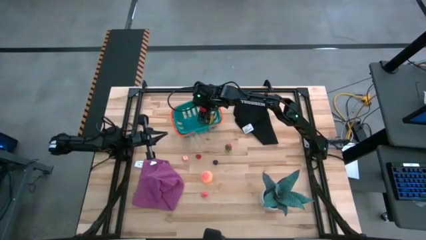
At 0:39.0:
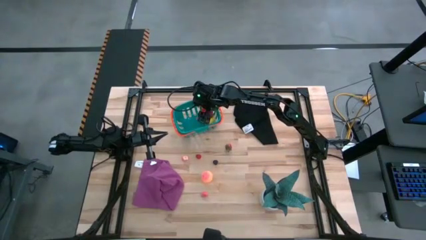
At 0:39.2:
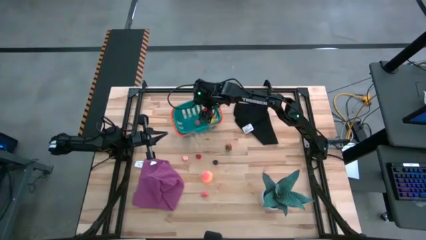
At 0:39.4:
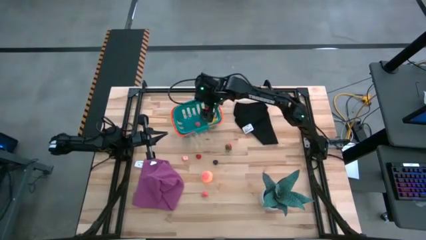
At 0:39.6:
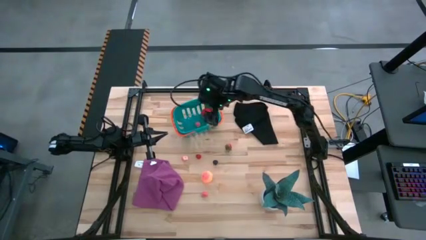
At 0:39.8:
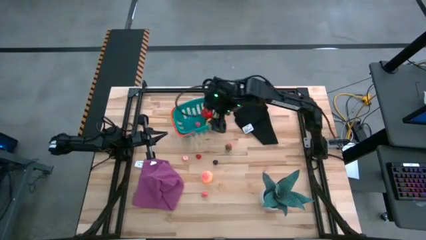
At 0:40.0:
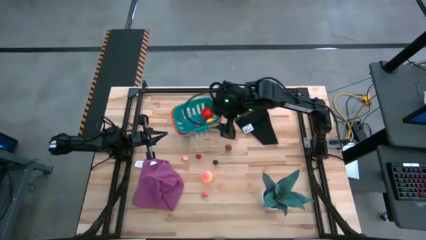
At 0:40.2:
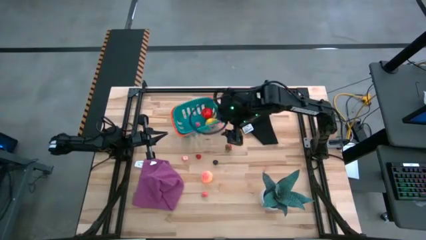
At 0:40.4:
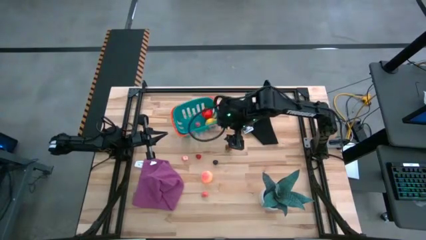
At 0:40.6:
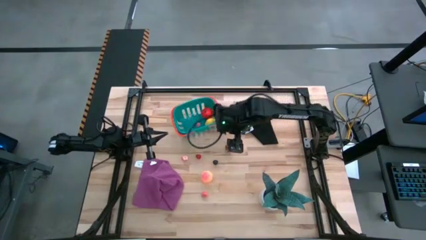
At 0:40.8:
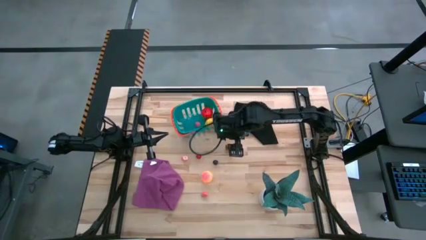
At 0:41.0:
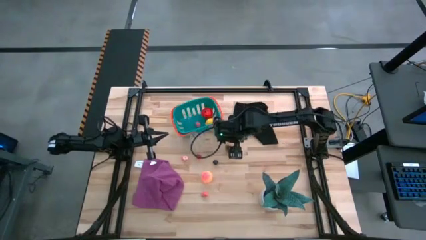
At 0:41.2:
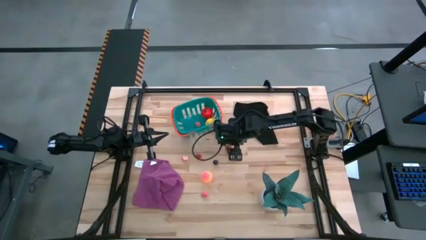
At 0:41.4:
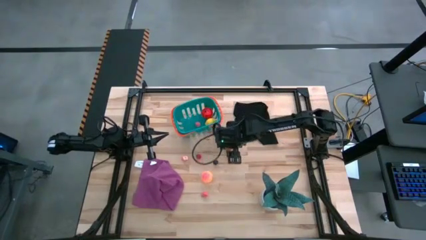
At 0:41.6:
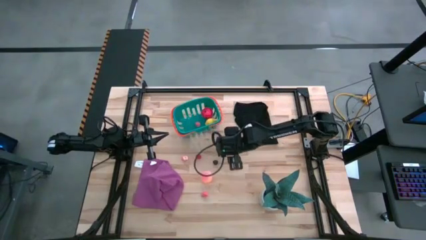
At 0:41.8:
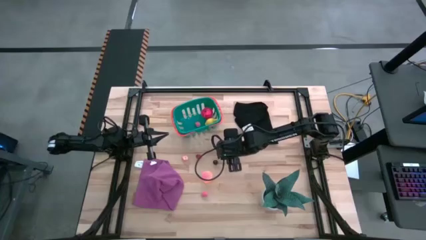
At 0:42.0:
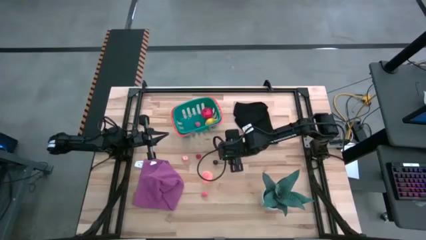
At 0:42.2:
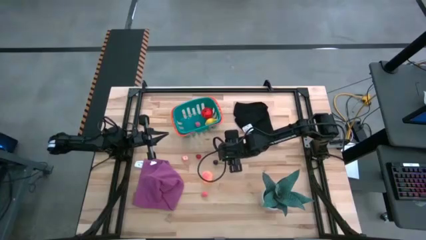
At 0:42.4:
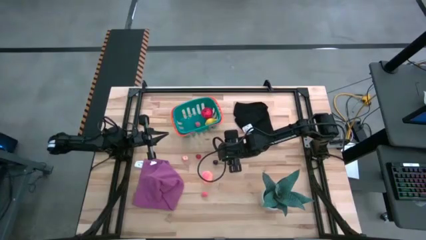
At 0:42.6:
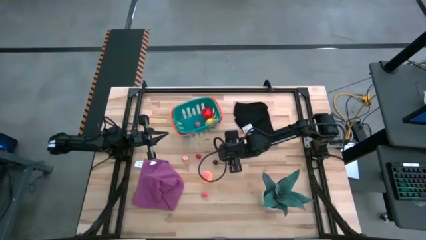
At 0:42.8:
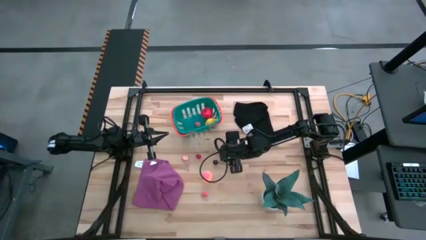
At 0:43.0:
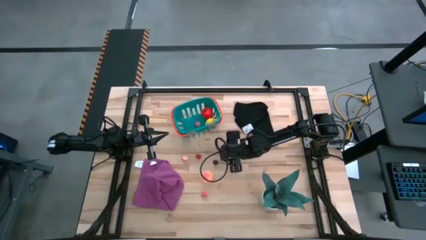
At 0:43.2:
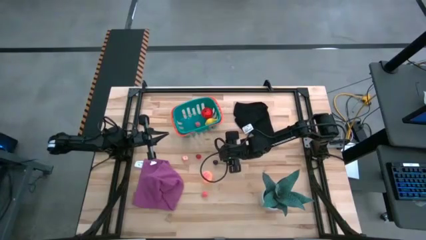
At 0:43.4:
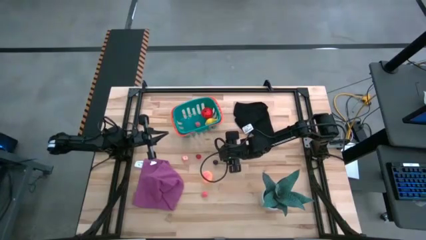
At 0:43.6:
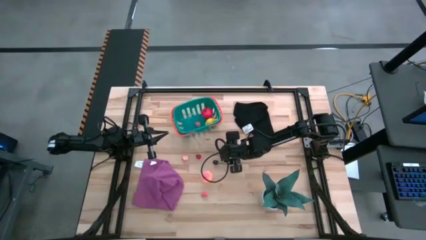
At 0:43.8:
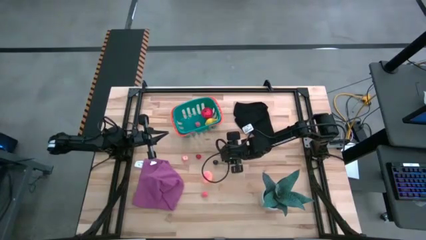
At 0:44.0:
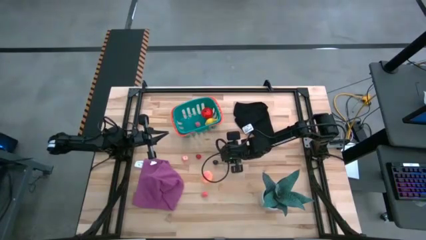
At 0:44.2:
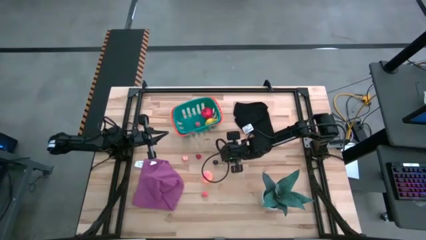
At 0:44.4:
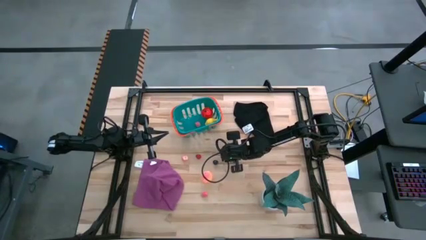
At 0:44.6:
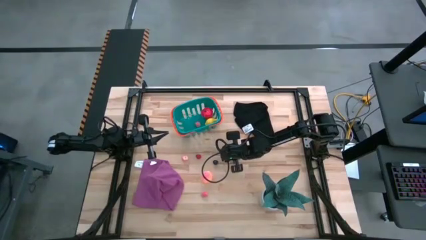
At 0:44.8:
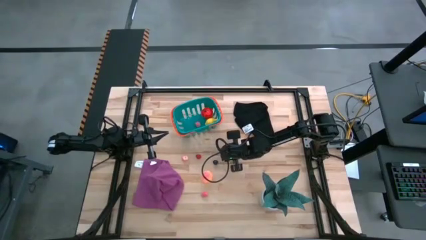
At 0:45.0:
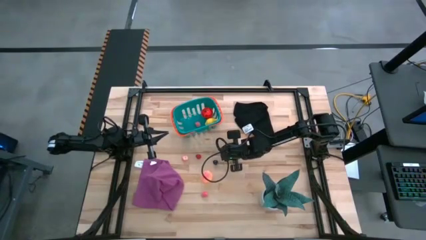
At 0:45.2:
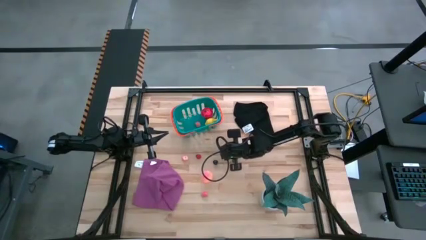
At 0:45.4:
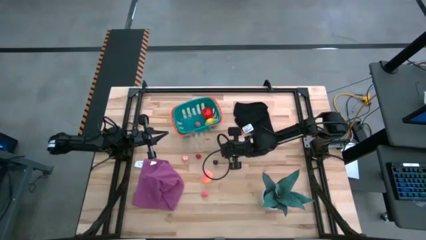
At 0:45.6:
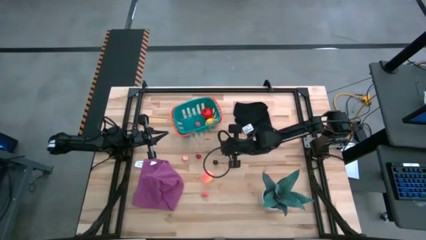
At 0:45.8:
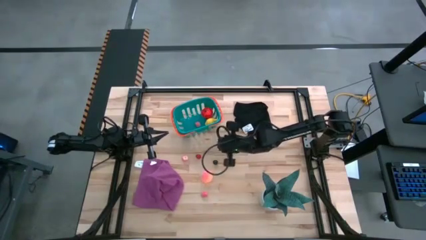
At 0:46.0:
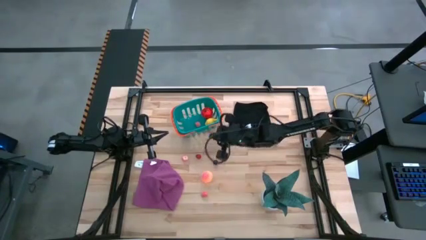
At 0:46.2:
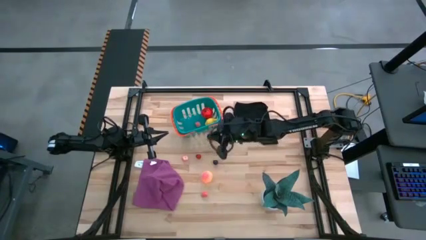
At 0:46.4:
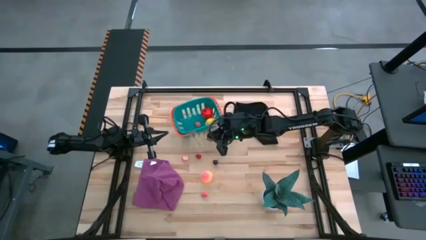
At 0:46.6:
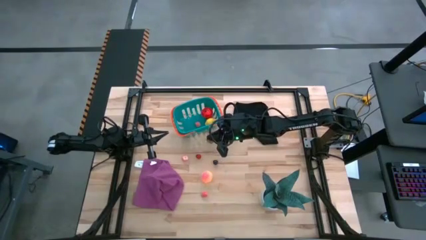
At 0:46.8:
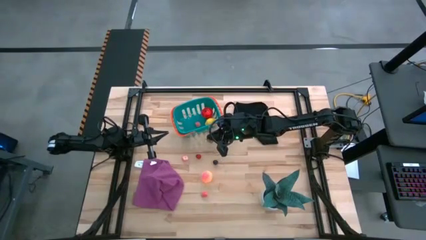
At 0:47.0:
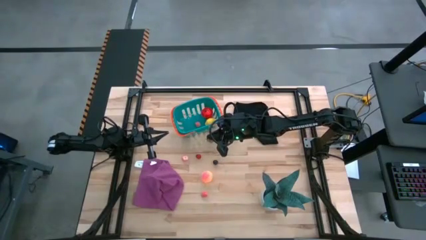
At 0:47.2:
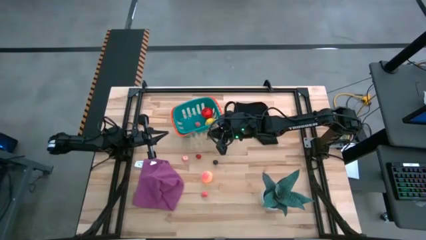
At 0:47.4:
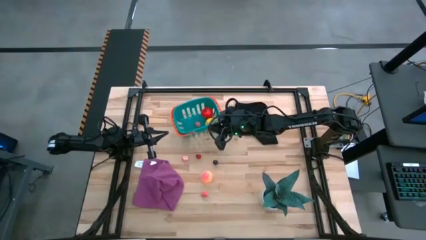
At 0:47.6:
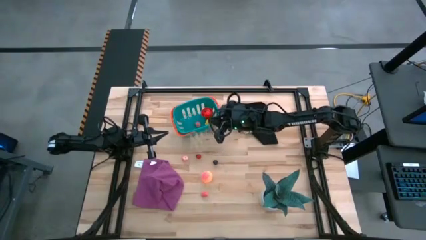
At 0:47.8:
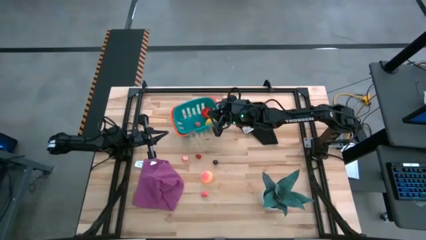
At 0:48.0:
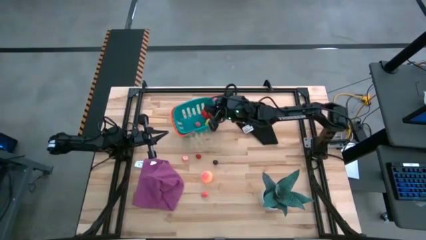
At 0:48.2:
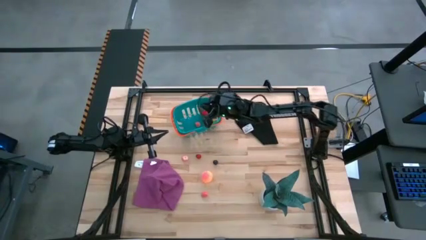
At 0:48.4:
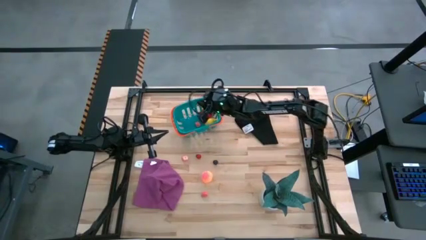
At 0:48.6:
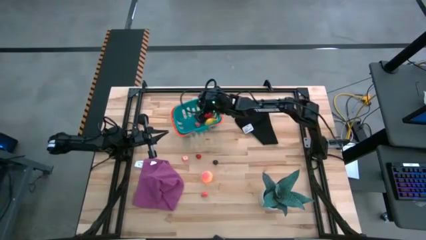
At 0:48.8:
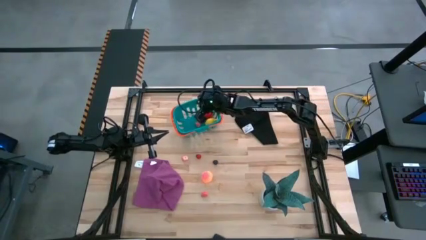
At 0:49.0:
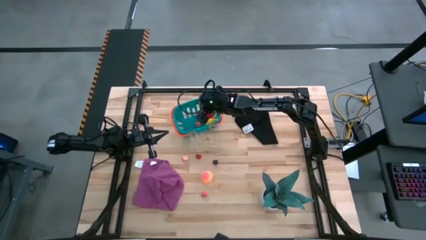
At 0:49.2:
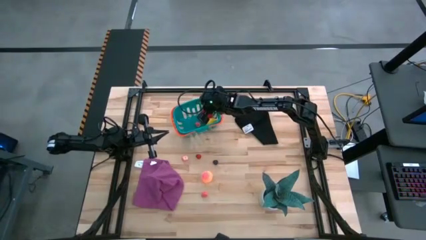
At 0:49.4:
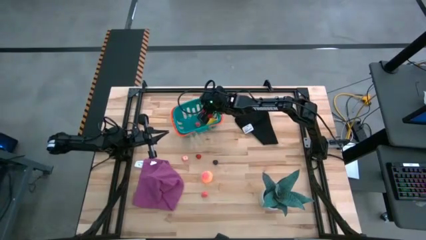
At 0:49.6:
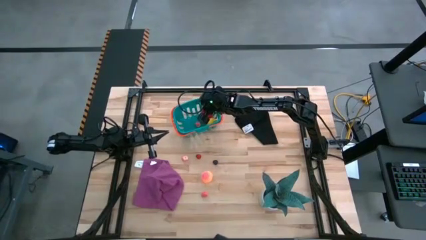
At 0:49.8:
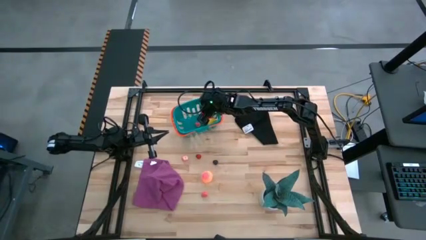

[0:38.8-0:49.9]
Task: Pick and placing Produce into tupperware
Put the red strawberry into the basket

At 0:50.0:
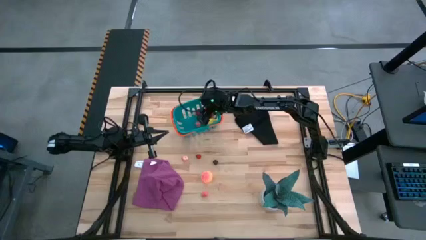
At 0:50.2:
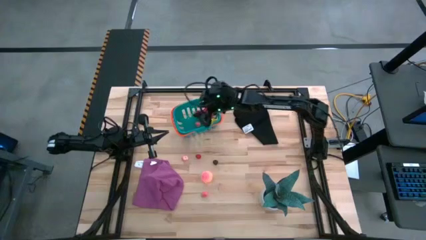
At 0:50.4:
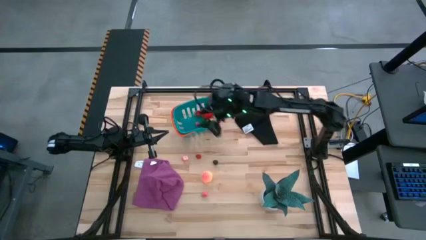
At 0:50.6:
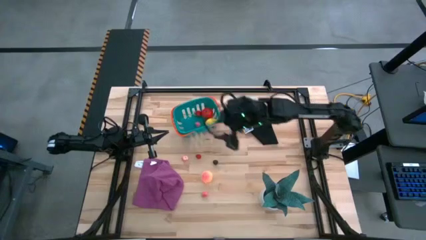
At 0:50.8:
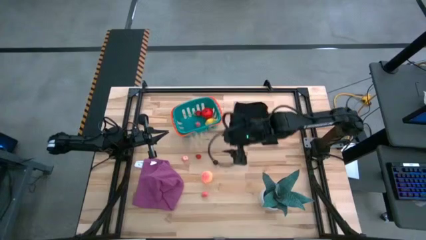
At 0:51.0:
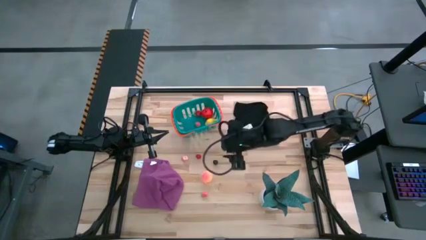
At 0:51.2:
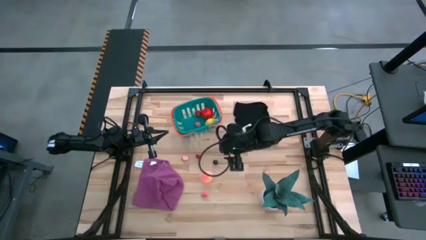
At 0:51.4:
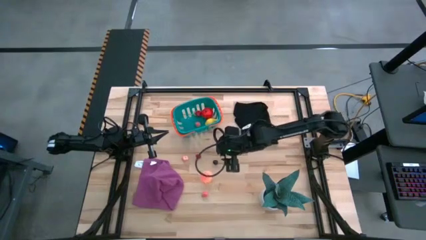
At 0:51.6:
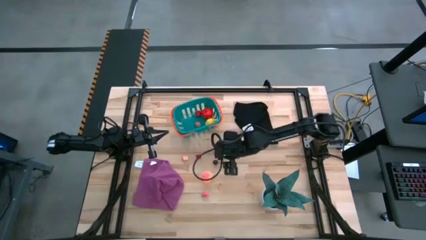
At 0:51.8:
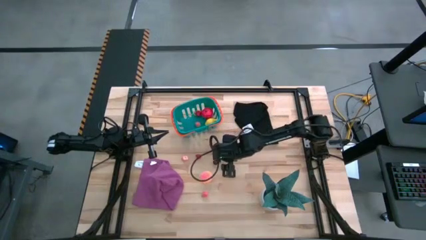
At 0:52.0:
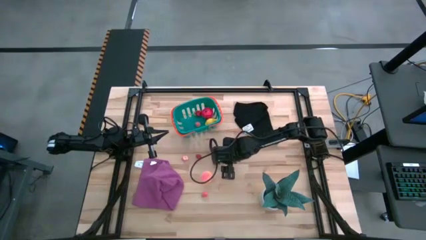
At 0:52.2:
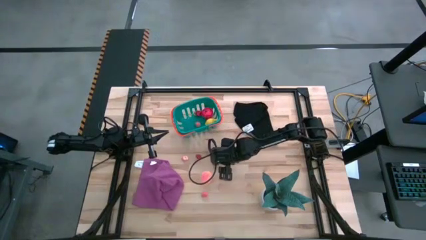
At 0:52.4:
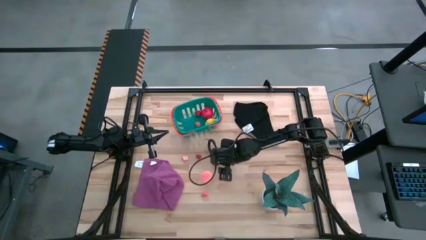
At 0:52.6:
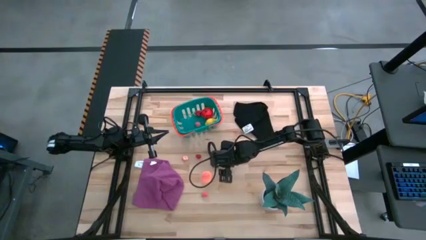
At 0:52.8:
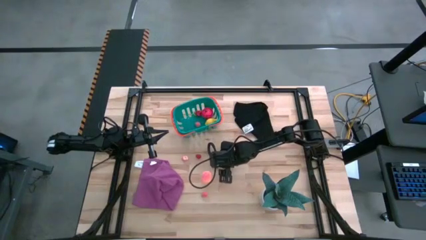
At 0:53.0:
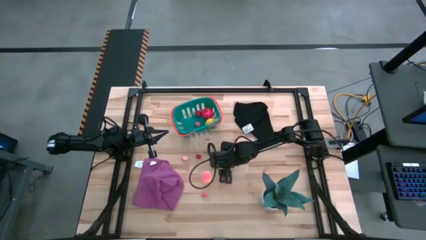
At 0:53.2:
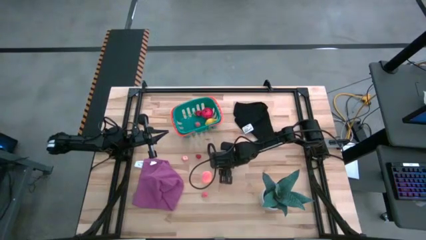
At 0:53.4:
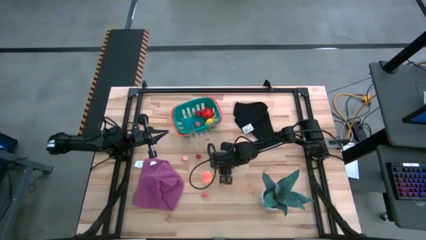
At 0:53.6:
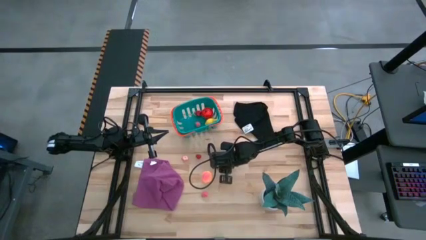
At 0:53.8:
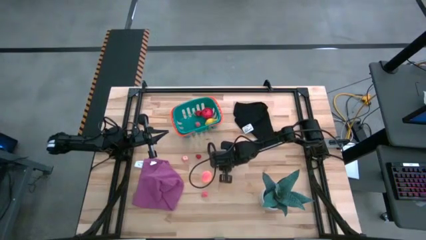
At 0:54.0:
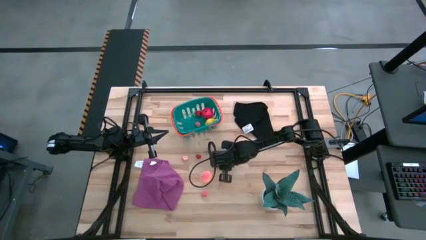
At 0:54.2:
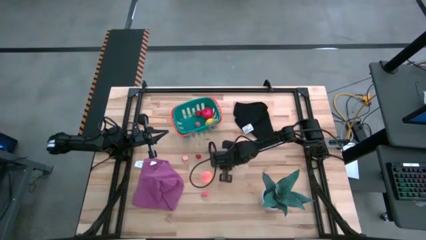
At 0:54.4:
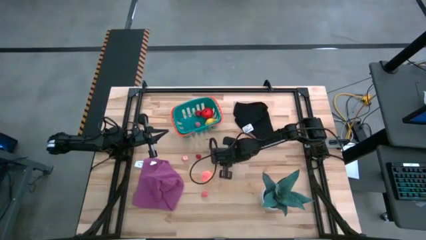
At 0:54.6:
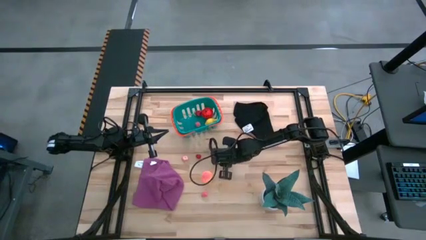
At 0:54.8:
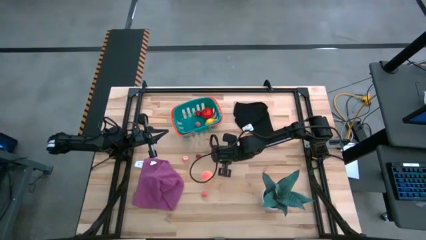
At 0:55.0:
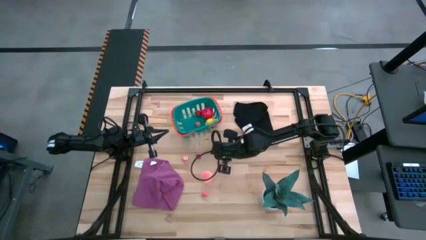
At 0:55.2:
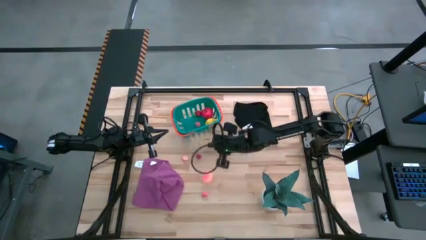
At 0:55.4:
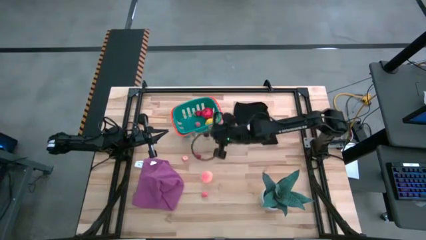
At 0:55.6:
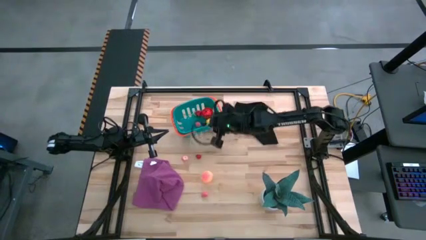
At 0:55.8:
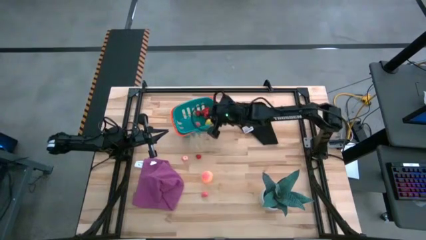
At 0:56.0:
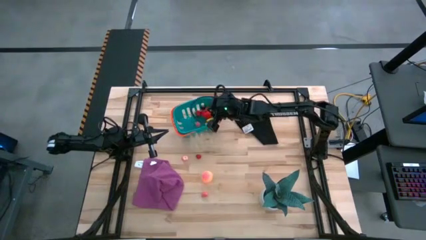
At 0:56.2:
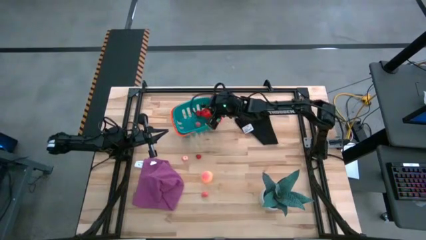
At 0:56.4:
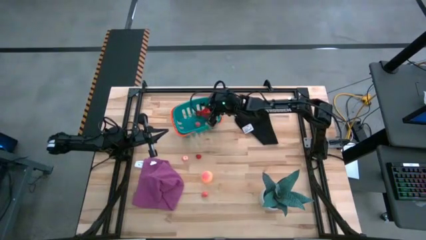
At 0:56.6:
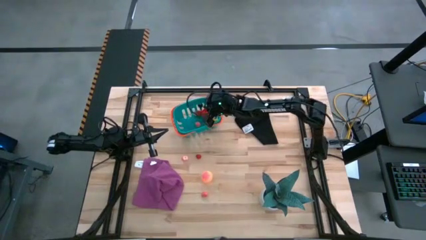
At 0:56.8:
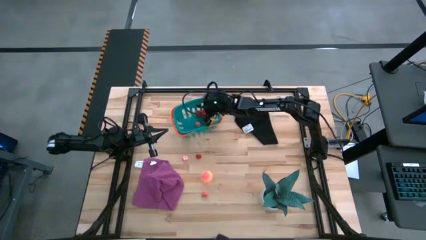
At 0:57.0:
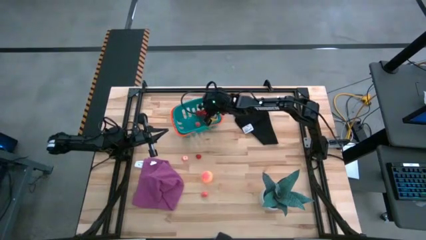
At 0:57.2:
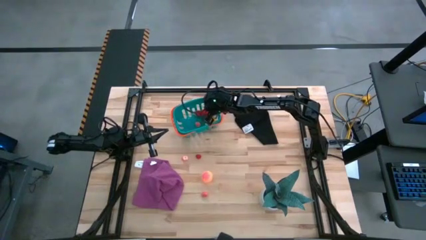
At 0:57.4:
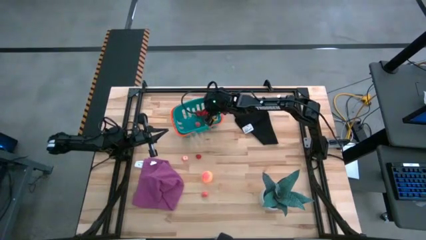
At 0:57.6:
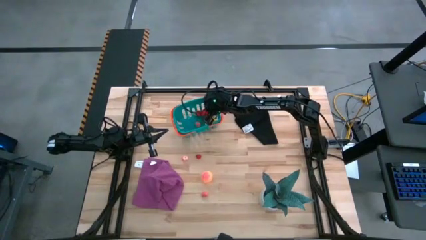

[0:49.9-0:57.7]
Put the black cherry into the basket
